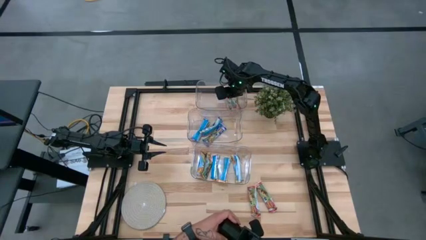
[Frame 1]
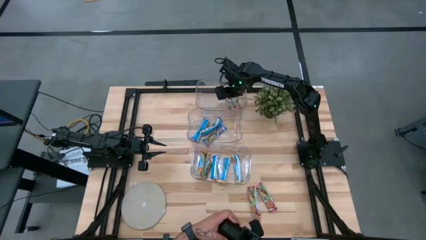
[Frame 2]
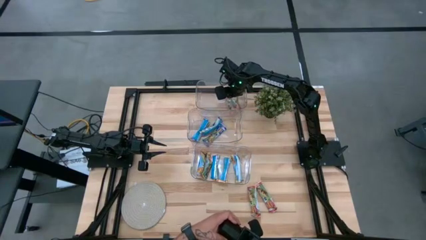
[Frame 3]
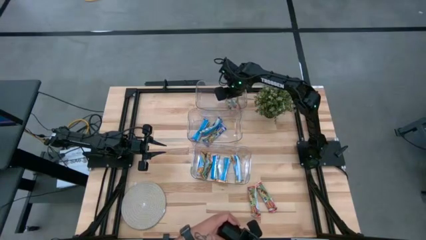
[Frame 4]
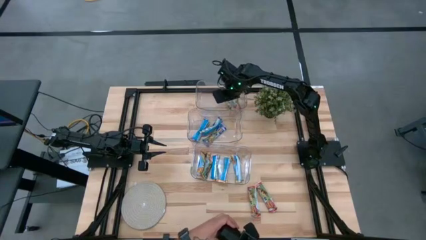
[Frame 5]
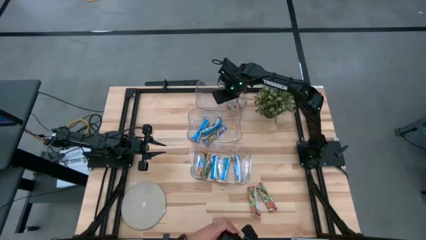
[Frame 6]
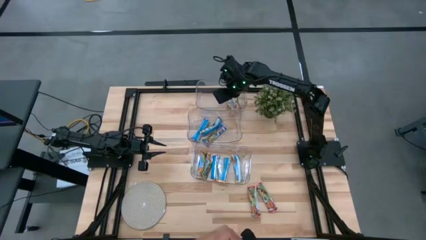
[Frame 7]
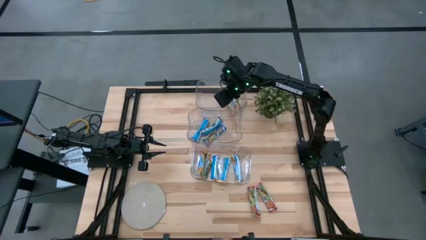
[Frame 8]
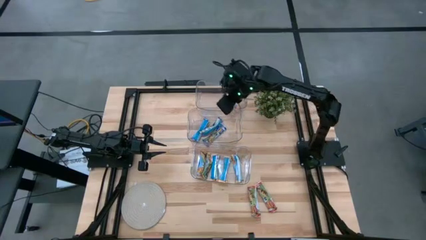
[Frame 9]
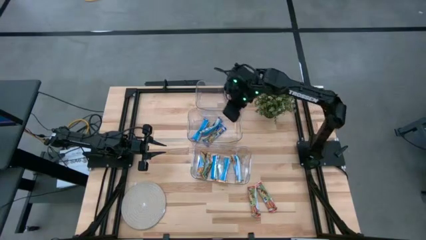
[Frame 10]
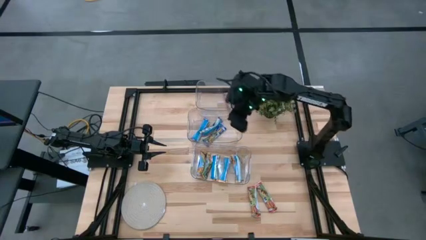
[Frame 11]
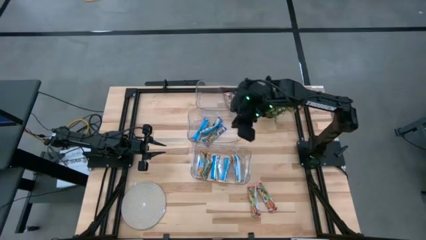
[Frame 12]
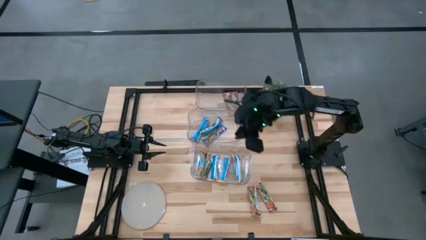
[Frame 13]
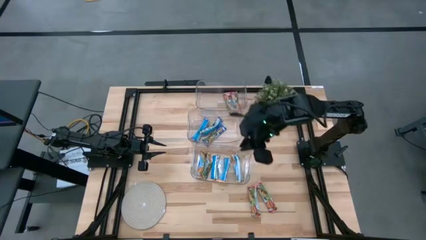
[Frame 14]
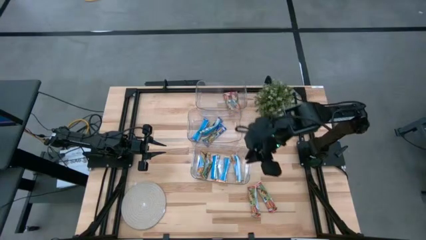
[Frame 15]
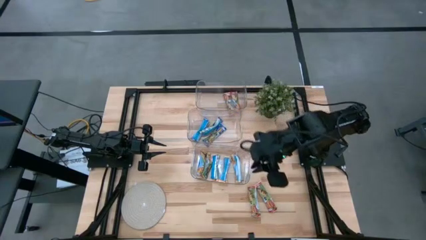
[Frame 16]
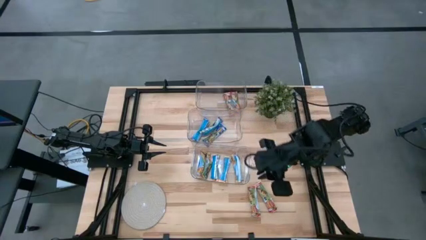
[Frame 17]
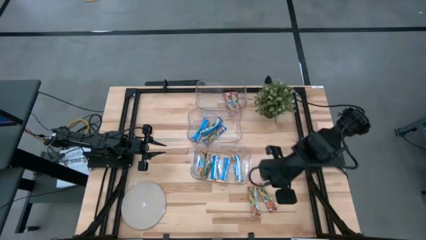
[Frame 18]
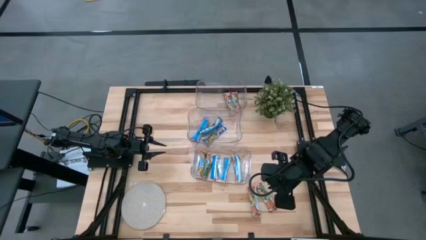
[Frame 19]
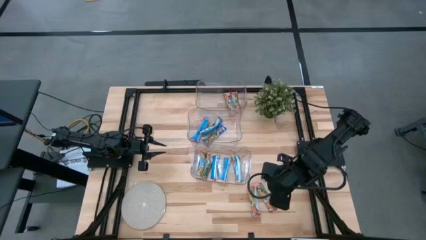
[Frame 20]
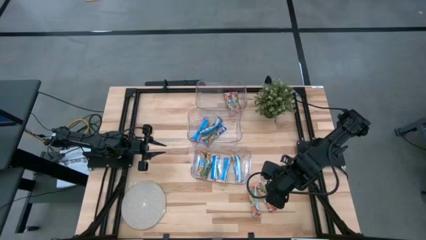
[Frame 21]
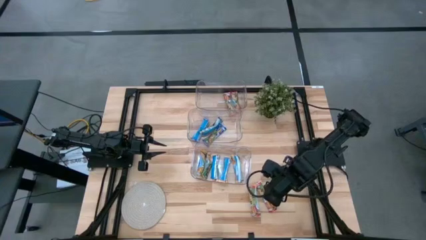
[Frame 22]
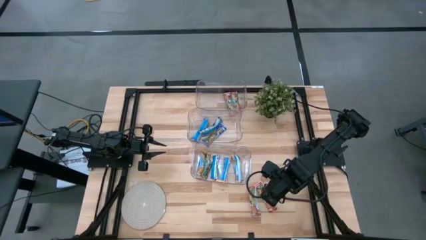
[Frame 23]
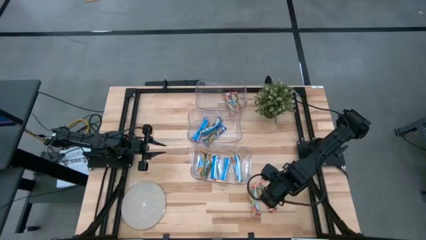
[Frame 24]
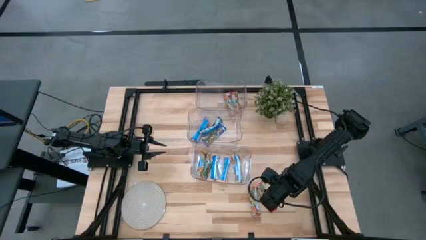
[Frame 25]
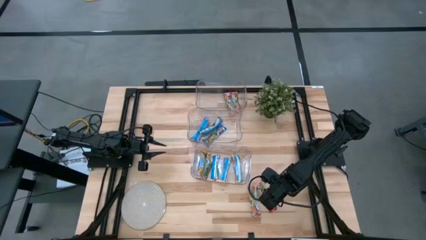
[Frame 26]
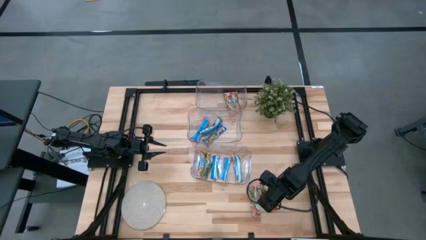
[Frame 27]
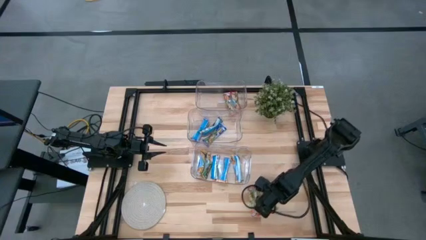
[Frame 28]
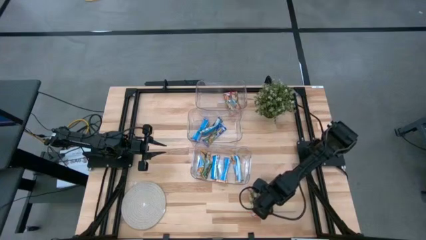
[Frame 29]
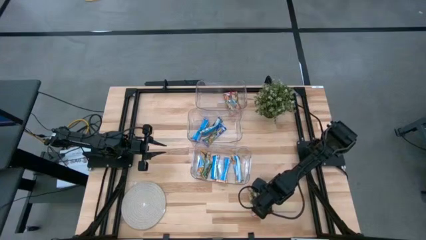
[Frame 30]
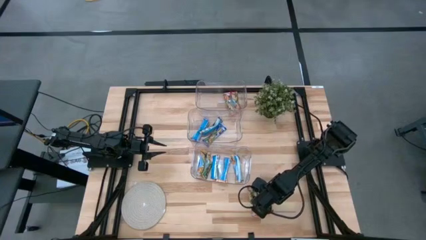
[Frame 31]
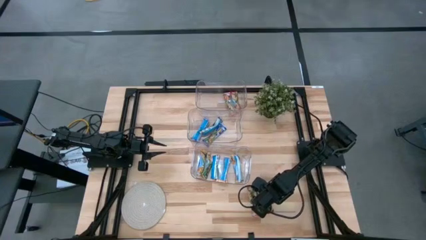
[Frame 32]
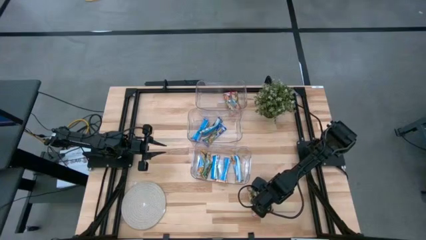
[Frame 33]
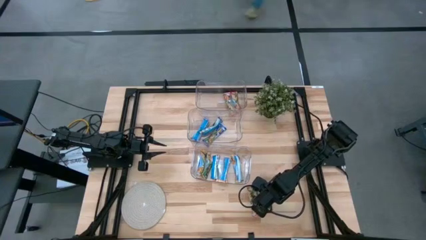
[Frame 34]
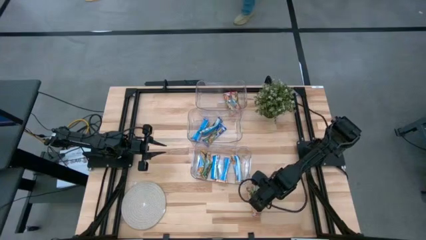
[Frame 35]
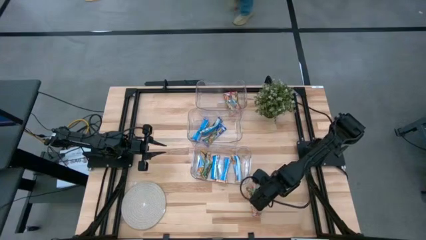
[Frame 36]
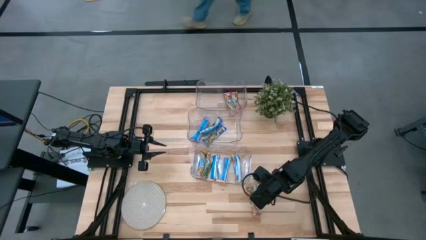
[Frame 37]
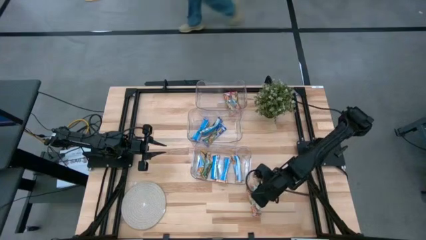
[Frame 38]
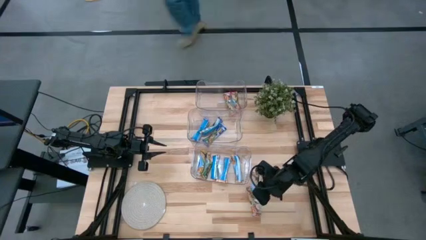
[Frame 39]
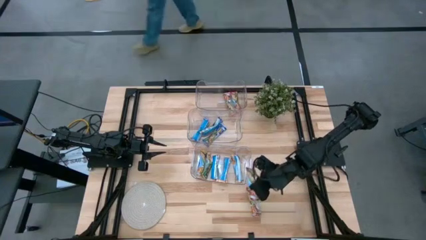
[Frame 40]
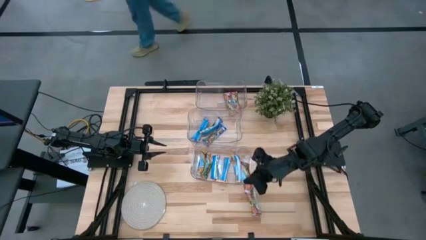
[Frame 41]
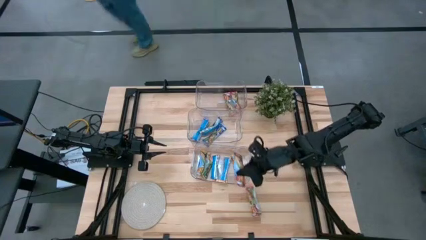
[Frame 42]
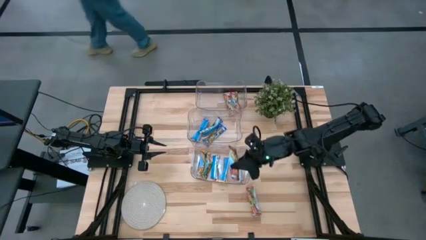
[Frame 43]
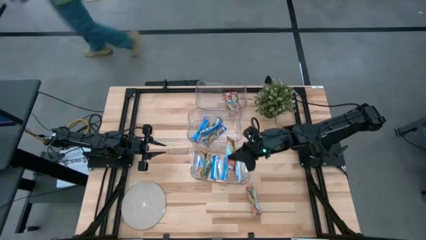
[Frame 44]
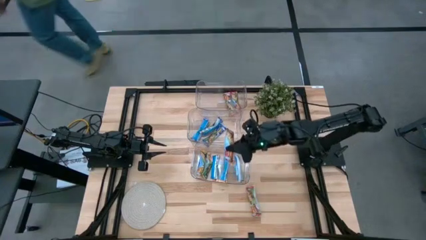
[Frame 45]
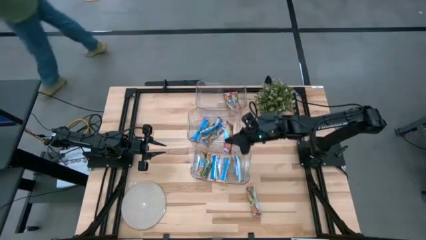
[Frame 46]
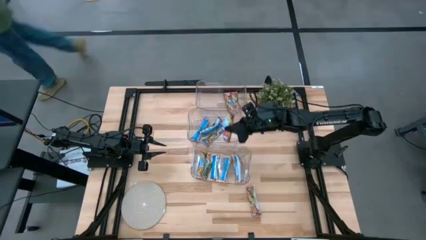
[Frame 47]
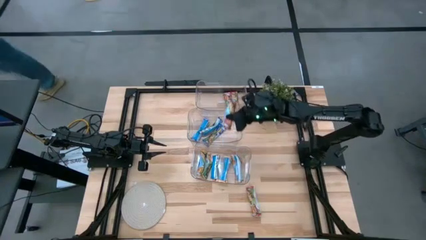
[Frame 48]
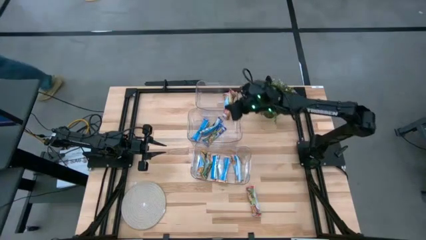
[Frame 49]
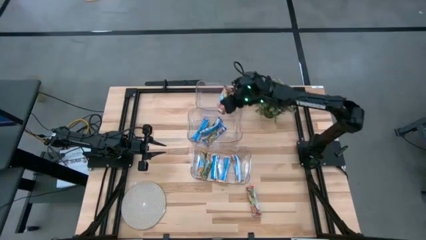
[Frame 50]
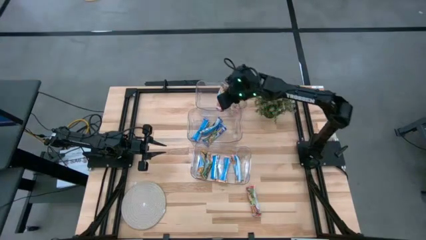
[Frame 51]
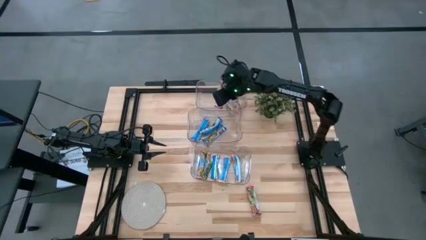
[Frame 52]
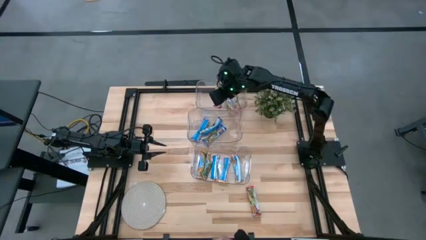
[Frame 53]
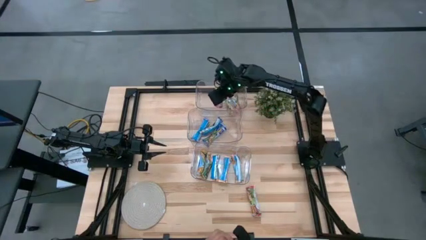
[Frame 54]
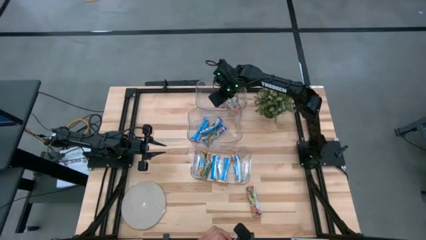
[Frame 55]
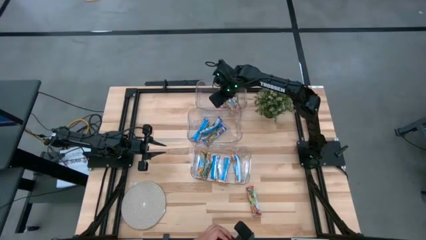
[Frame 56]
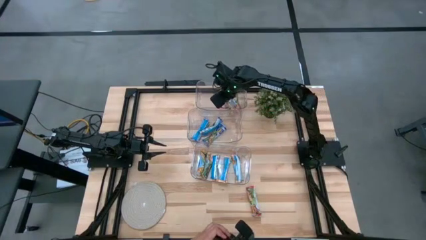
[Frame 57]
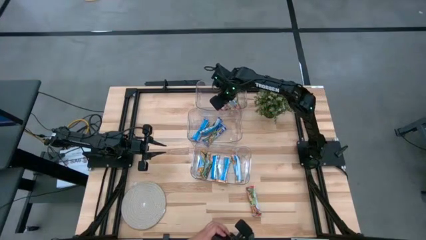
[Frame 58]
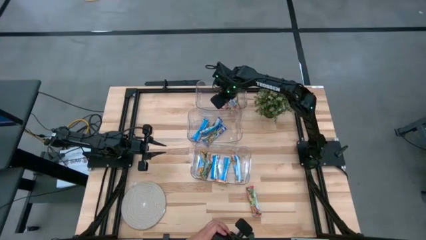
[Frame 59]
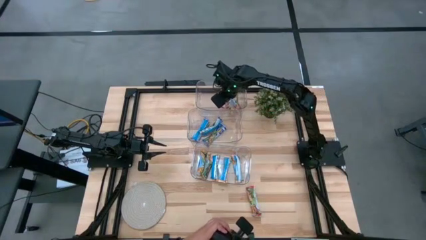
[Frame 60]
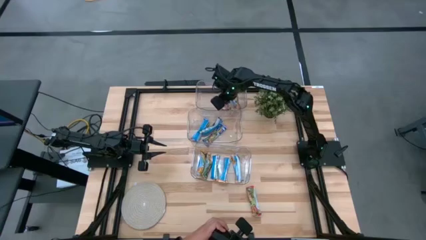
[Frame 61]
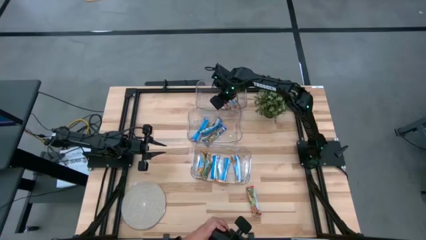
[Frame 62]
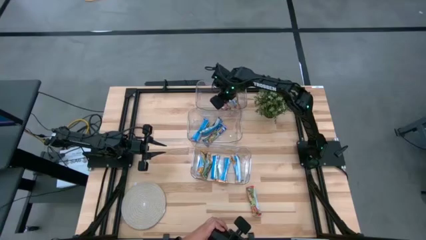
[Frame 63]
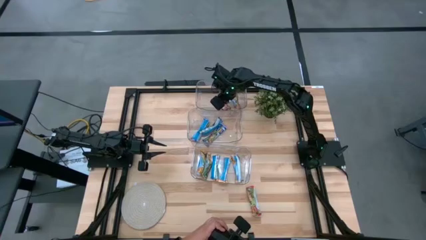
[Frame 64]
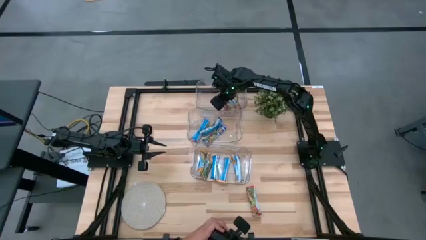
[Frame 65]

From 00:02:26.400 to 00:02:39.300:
Task: Pick and place Granola Bars by type
Put the red granola bar into the top transparent bin

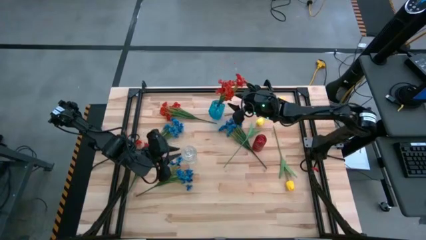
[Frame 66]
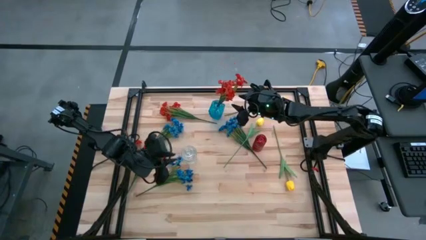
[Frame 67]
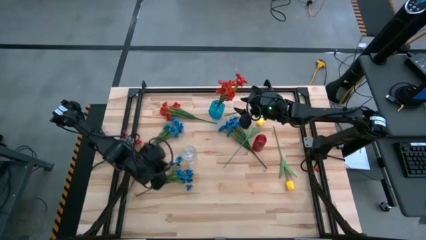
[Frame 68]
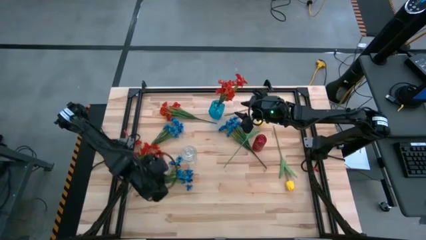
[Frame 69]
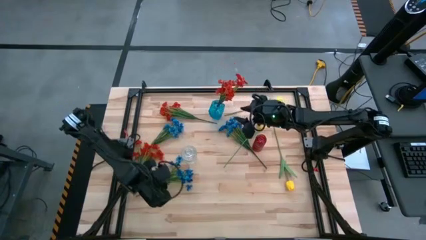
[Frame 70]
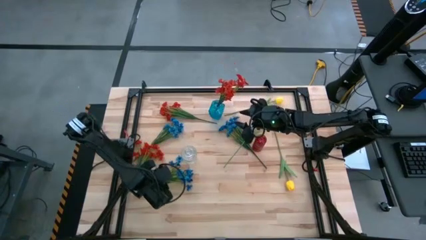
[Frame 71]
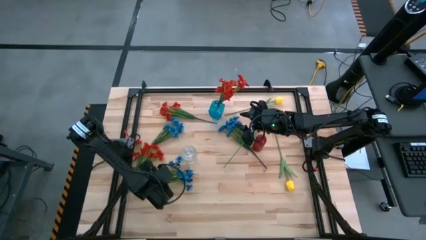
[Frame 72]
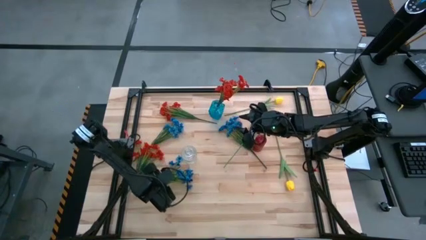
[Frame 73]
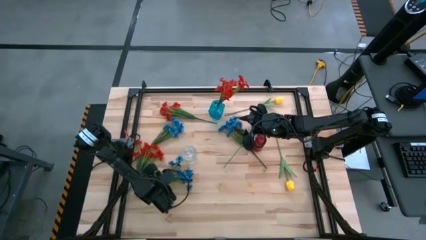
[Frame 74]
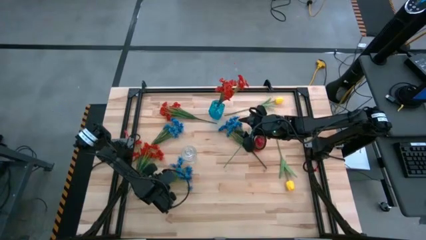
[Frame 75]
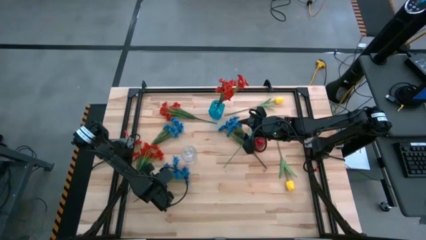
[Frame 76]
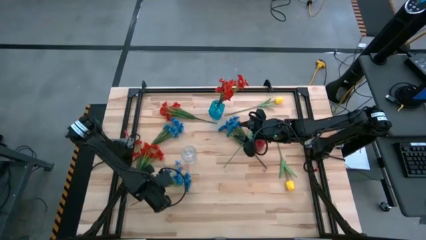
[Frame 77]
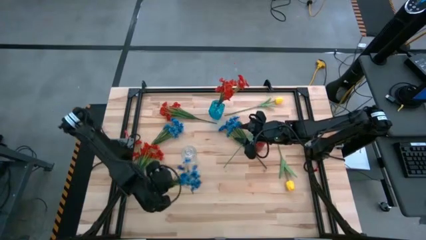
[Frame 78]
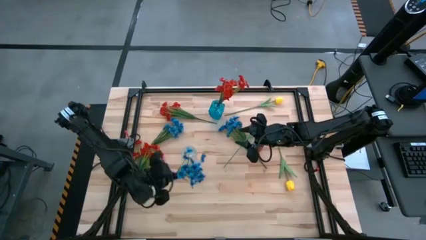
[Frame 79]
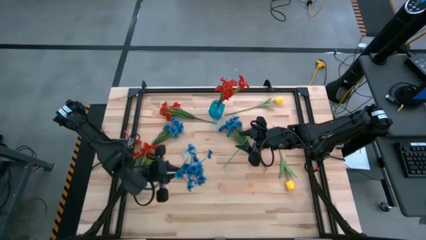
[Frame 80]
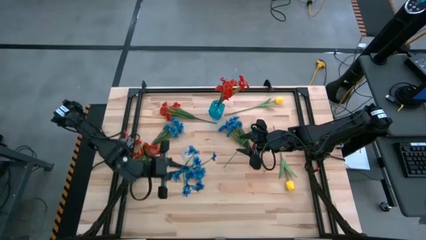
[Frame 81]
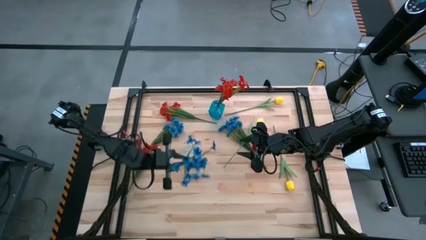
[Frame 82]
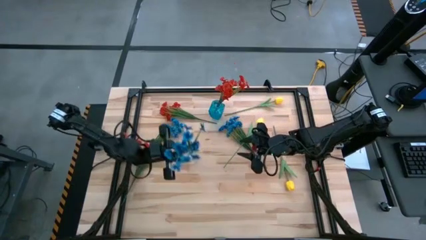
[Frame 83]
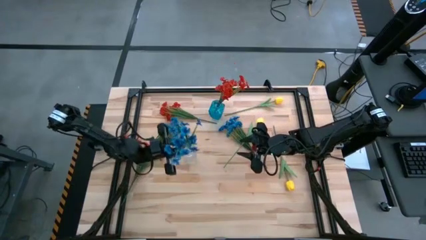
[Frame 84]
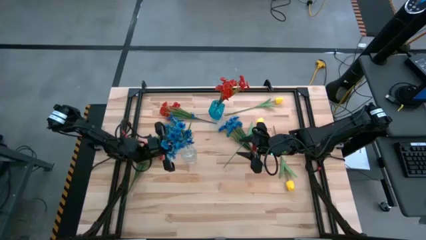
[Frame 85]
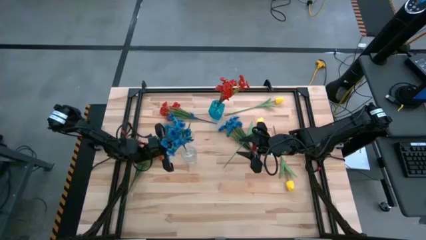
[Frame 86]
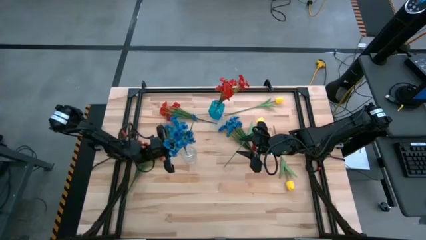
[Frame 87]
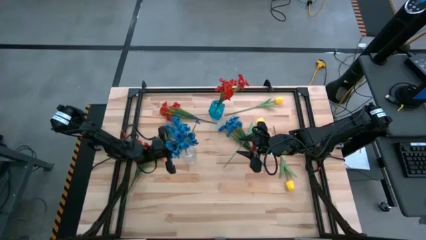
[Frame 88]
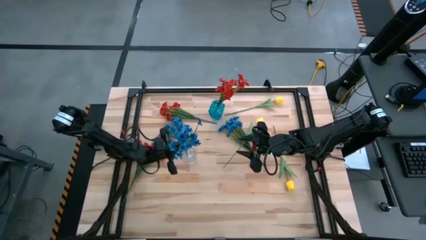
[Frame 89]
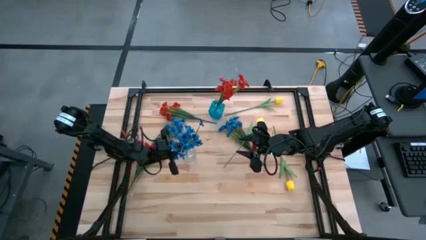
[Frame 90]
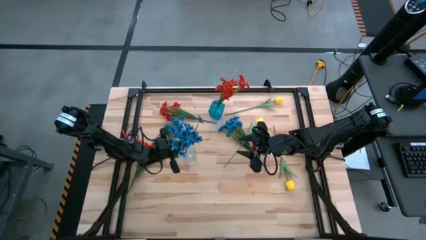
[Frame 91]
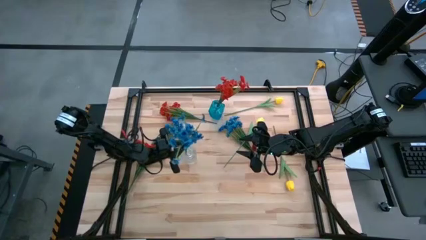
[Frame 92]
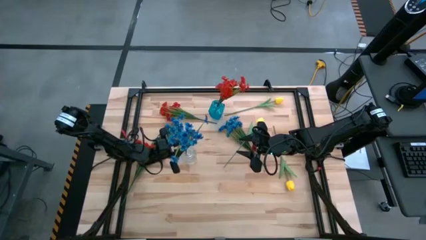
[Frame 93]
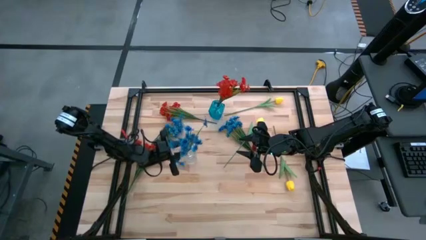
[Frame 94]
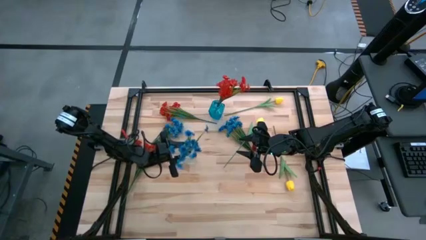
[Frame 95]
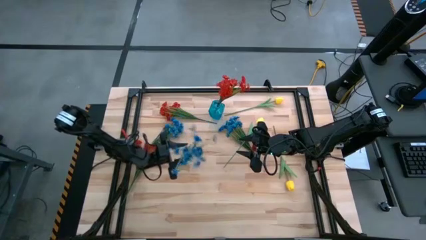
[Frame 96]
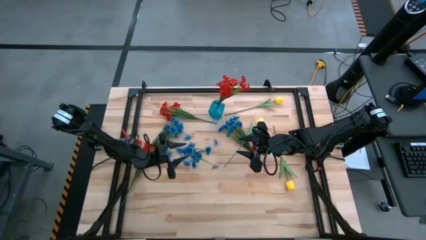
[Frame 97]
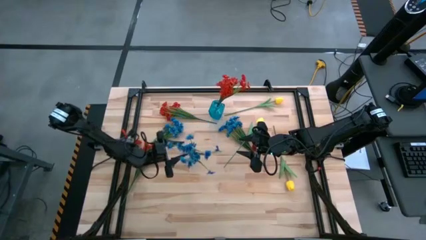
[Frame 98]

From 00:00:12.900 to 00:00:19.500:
Task: Sort flowers into vase by color
Put the bottom left blue flowers into the transparent vase
